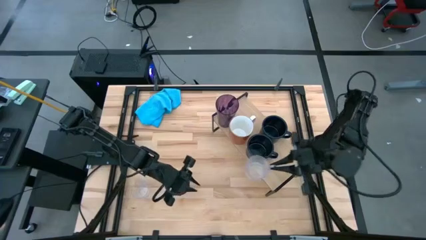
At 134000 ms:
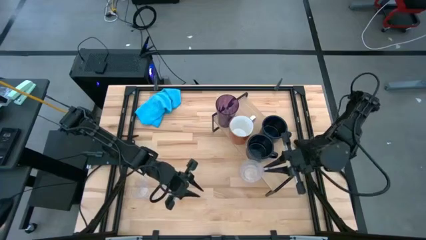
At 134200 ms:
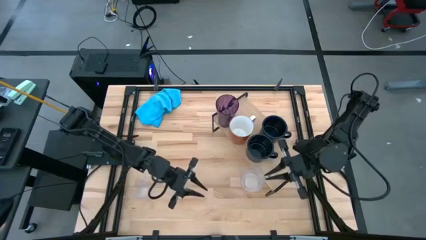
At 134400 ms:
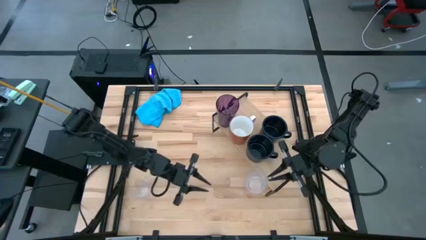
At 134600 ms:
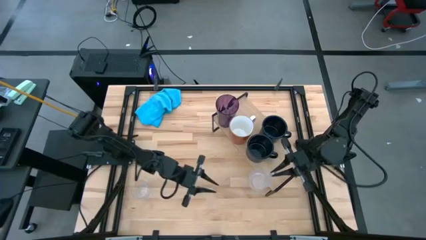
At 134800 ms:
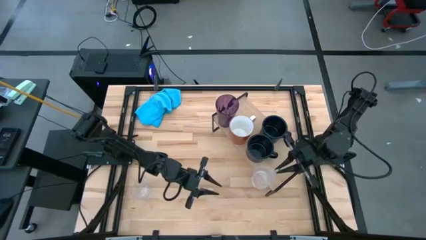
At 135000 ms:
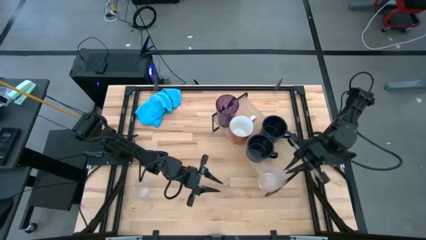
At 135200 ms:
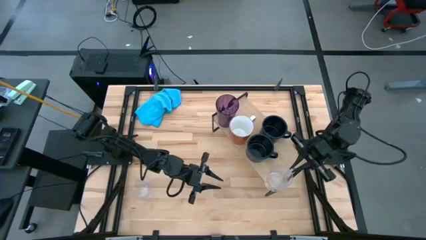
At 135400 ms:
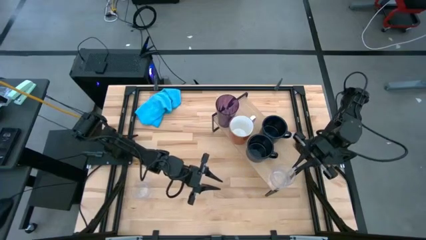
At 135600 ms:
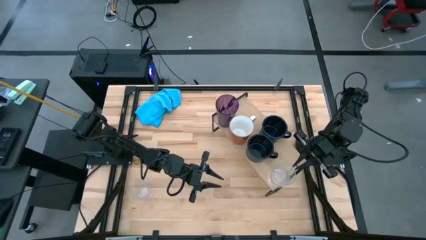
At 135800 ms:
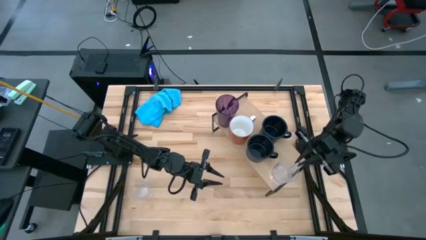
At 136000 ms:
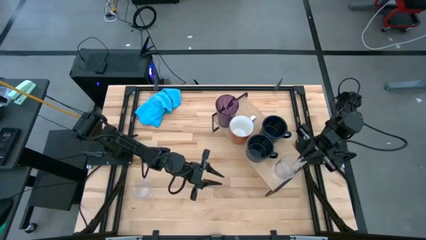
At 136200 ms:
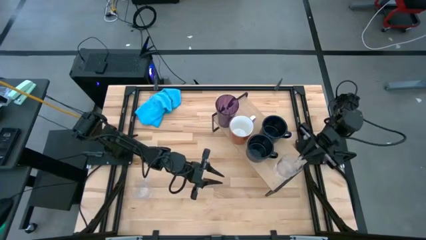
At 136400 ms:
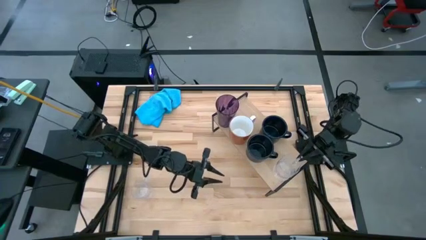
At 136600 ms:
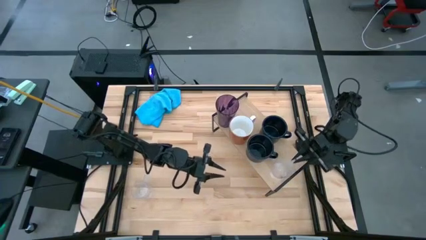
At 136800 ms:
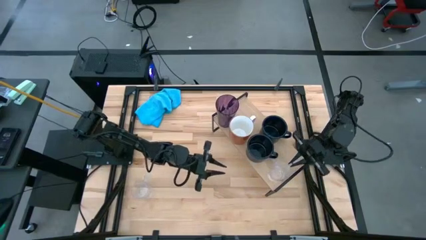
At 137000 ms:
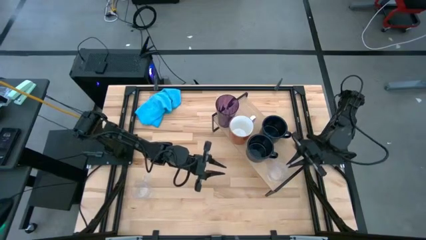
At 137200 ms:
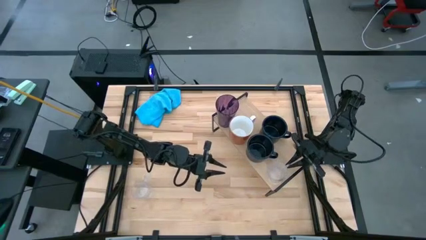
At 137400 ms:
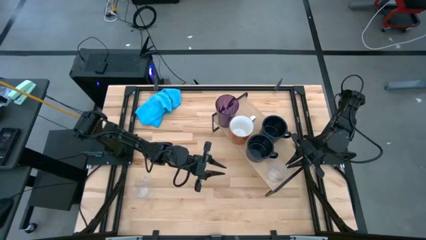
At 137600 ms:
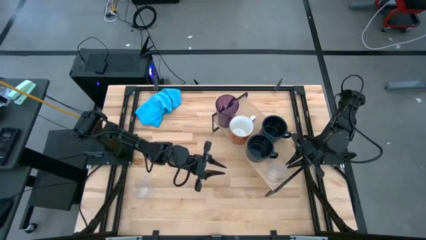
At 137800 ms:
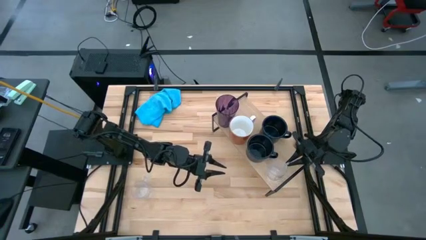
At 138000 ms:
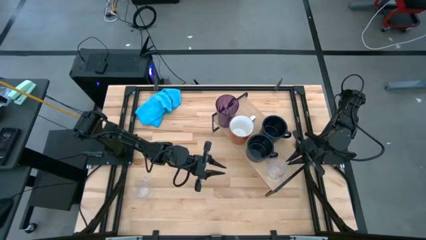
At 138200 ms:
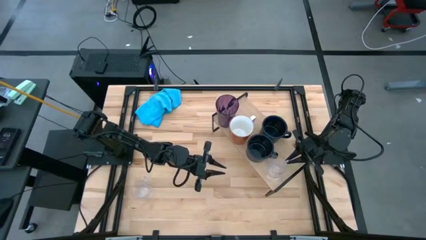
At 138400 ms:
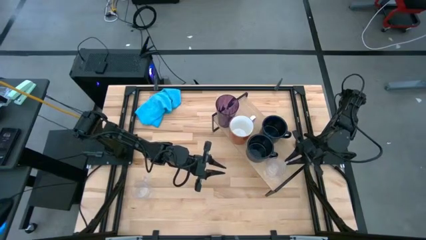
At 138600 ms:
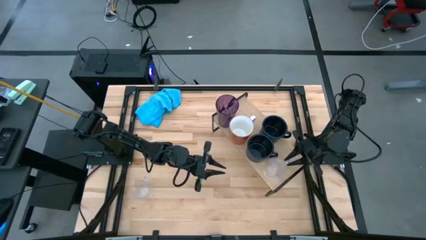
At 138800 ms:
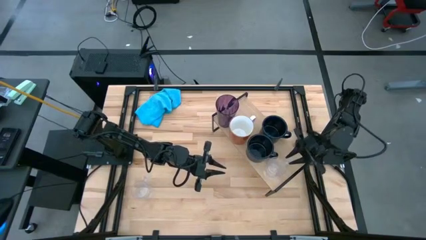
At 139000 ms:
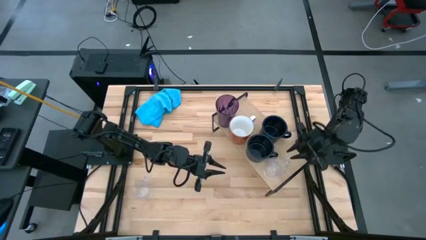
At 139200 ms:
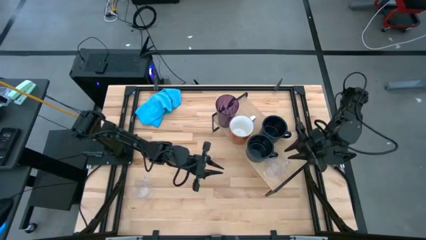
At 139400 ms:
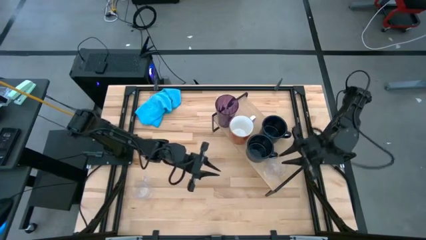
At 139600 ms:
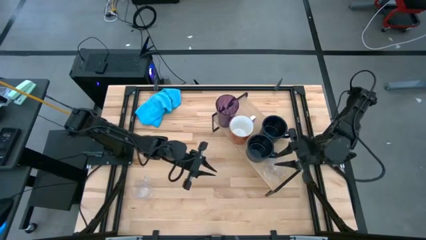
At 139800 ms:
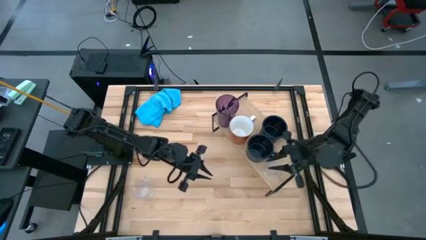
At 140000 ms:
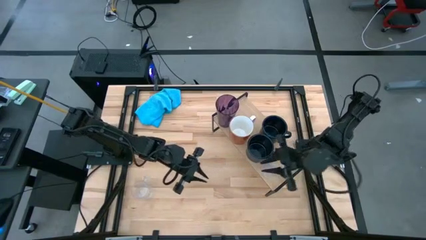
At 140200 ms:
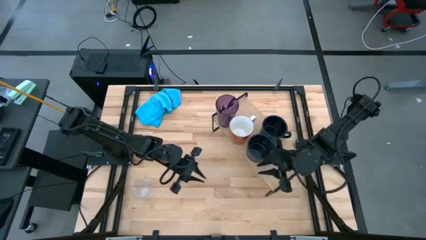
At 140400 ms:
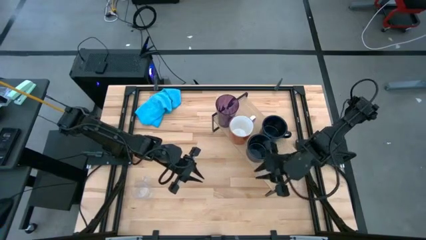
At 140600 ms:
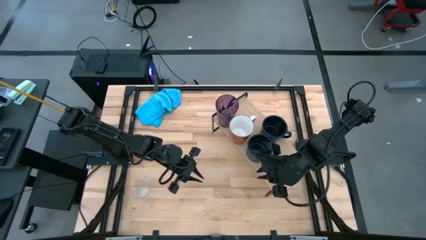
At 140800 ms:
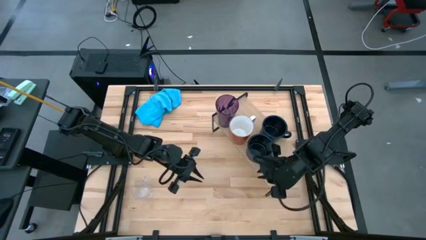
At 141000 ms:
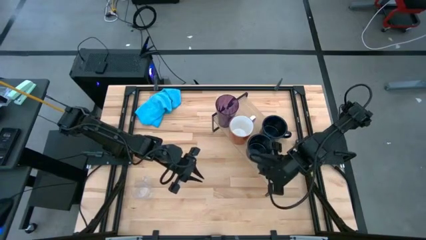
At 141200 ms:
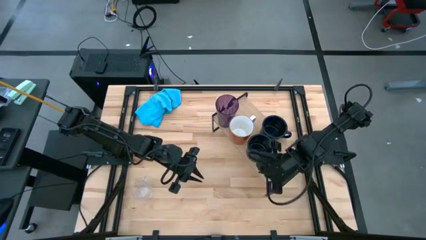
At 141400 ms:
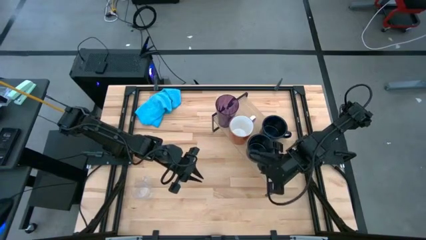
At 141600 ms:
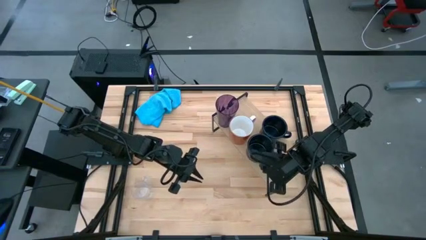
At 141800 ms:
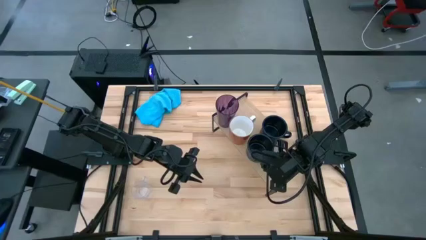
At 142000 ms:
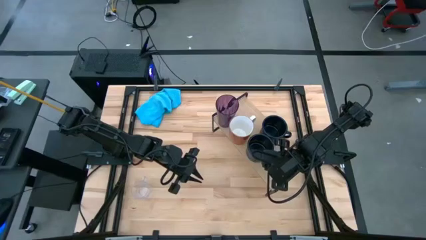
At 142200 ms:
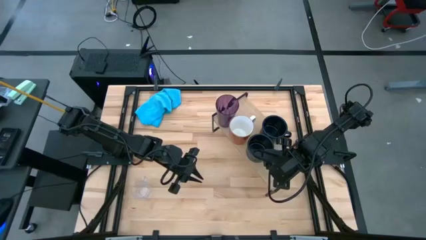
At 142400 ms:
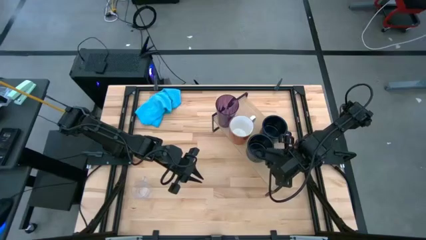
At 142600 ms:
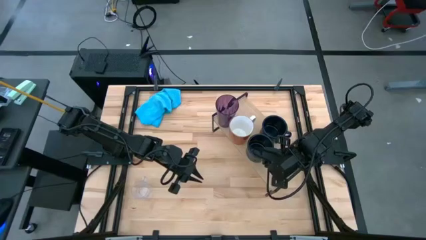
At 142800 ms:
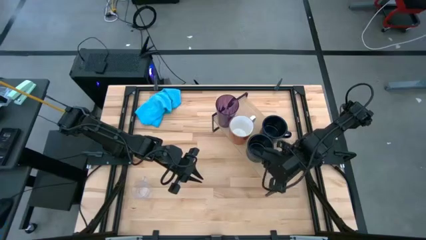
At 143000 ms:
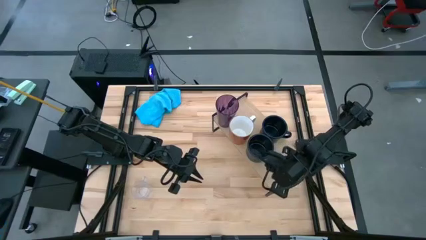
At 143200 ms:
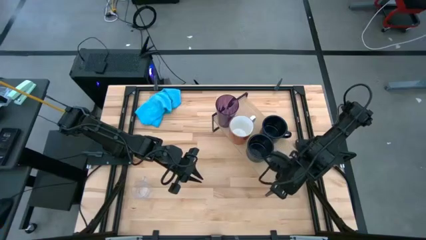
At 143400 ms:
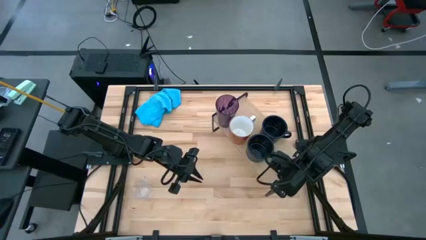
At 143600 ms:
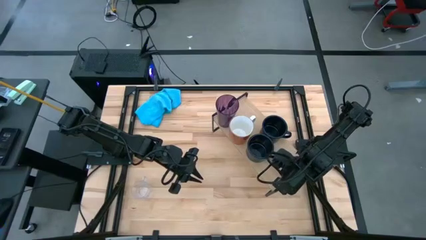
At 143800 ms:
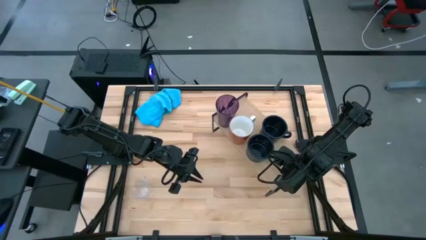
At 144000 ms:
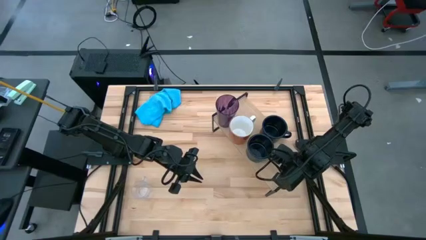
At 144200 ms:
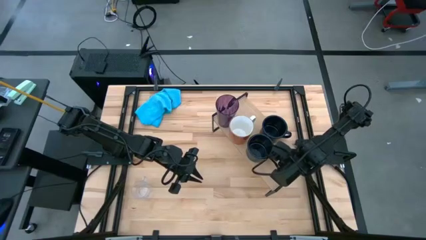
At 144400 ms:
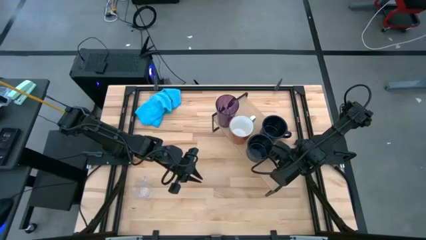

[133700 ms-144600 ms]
Task: Stack small to large cups/mugs on shelf
Put the bottom transparent mug on the shelf

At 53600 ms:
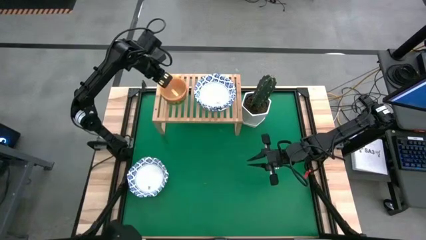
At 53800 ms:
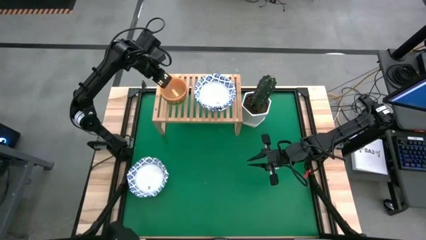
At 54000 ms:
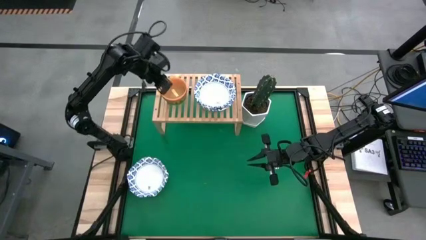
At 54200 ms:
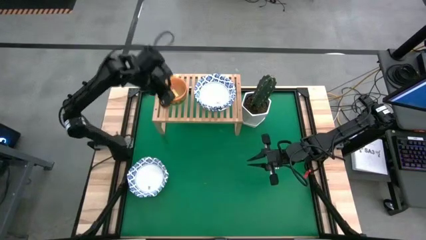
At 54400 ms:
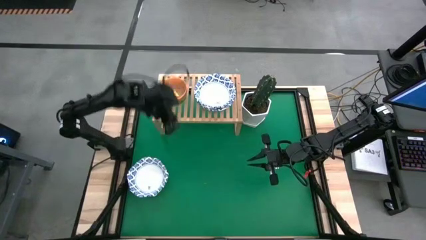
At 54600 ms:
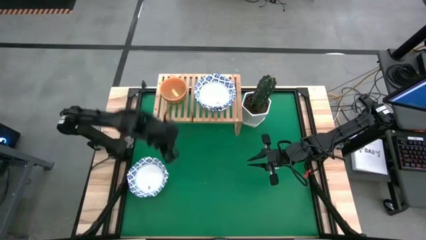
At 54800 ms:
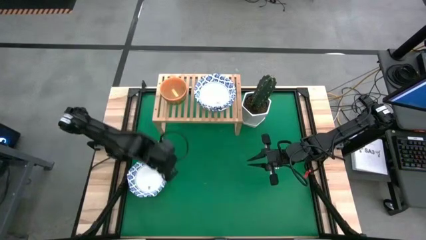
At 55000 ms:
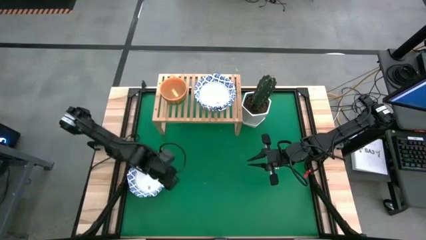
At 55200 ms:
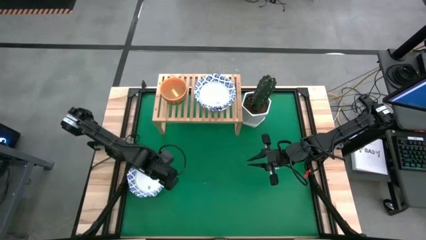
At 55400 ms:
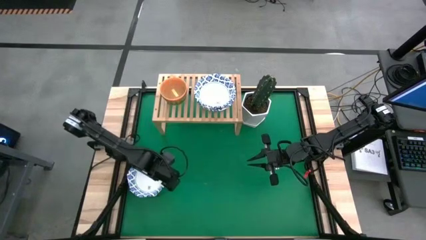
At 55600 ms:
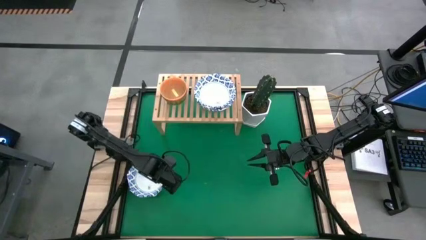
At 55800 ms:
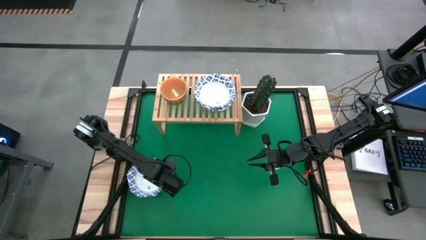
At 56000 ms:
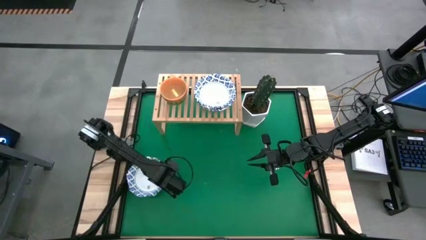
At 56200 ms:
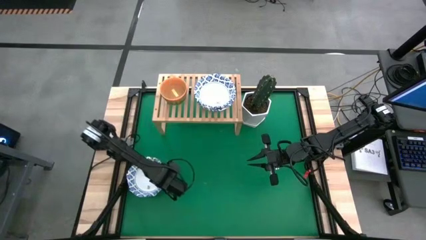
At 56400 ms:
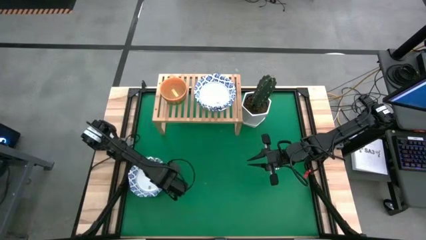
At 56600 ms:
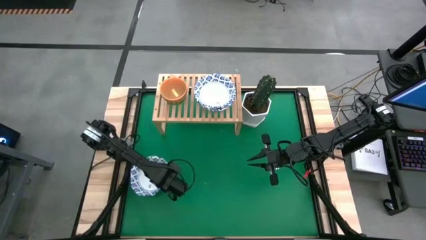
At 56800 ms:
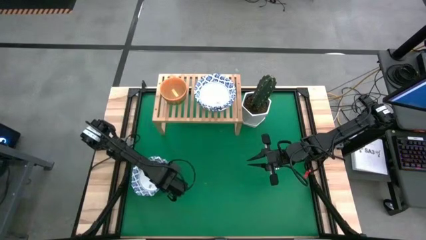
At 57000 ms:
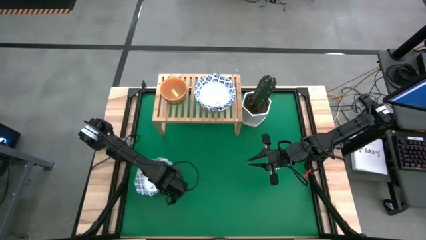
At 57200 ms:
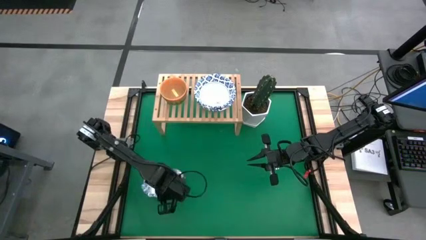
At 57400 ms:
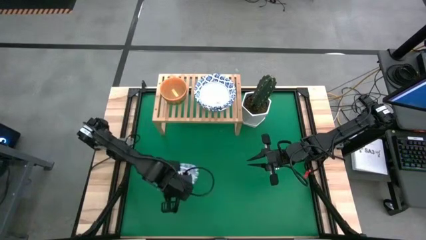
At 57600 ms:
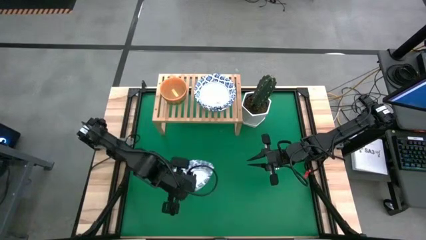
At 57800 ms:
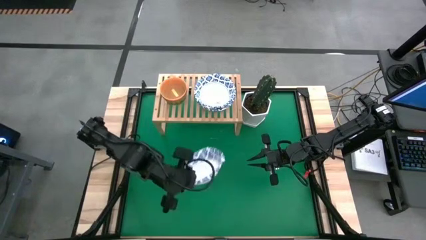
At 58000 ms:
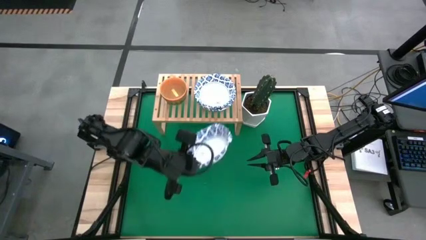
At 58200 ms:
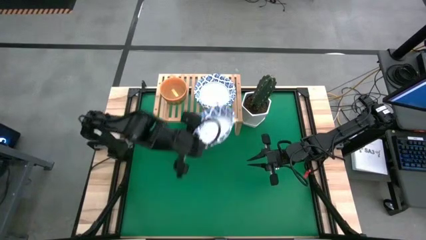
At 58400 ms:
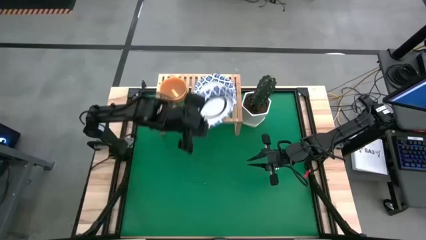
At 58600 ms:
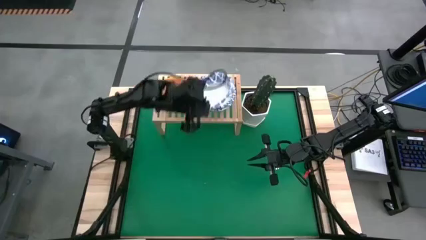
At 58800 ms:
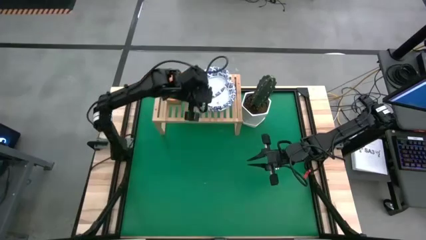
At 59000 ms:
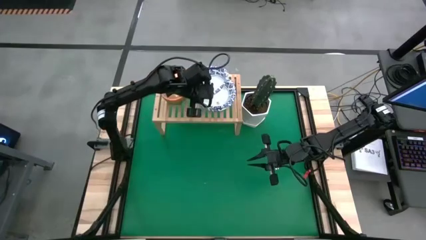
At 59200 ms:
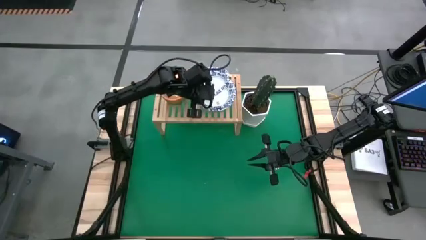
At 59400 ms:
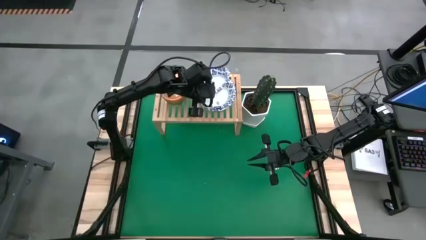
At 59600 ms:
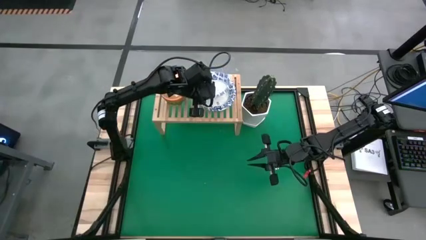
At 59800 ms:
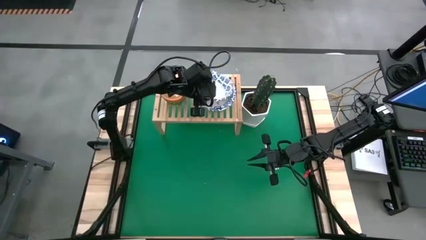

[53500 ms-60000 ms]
Task: Place and stack bowls onto a shelf
Stack the white patterned bowl on top of the white patterned bowls on the shelf
